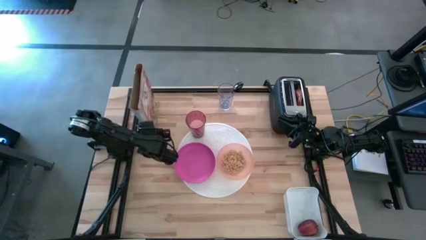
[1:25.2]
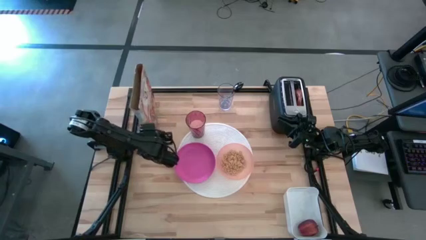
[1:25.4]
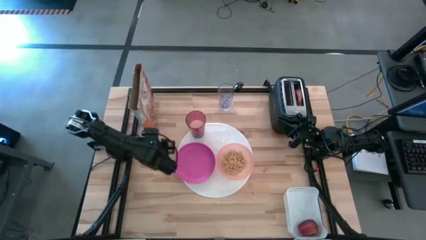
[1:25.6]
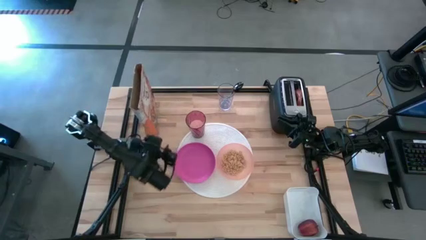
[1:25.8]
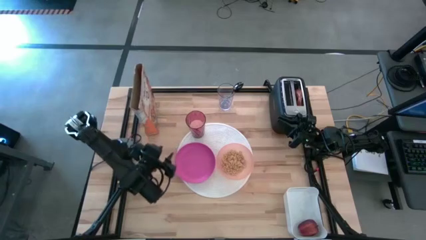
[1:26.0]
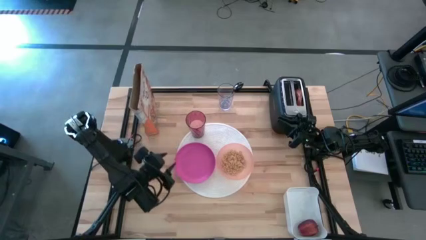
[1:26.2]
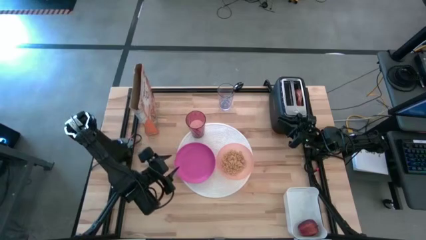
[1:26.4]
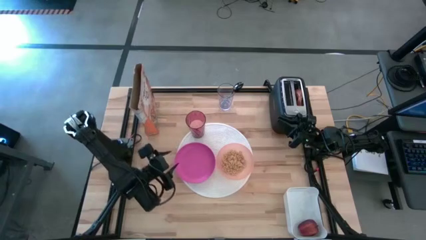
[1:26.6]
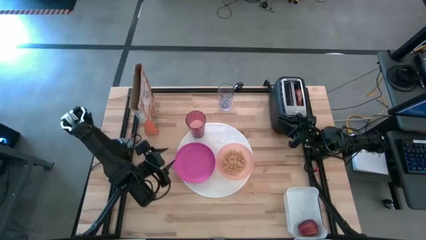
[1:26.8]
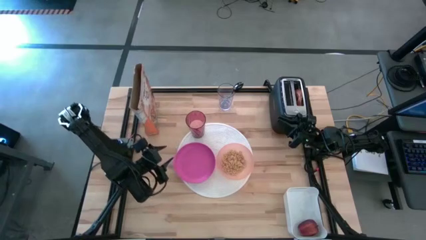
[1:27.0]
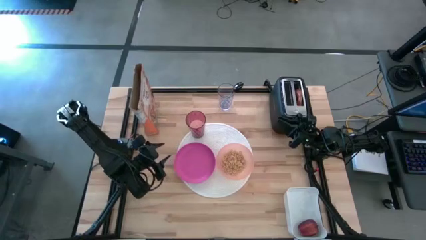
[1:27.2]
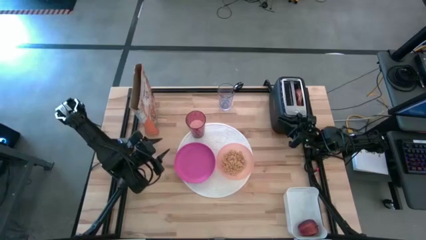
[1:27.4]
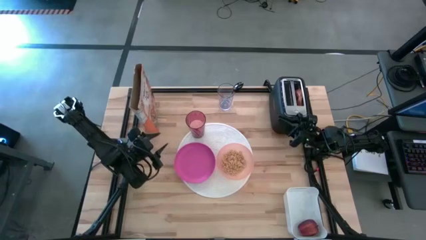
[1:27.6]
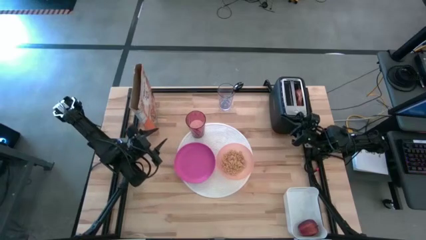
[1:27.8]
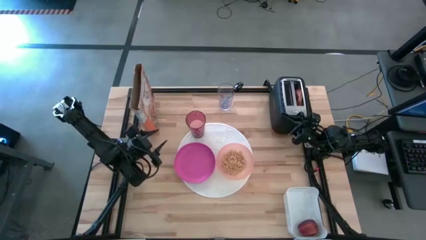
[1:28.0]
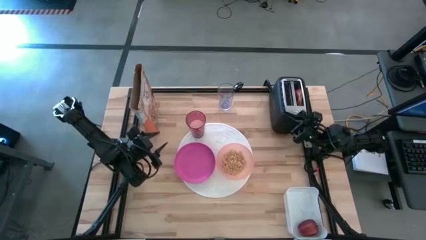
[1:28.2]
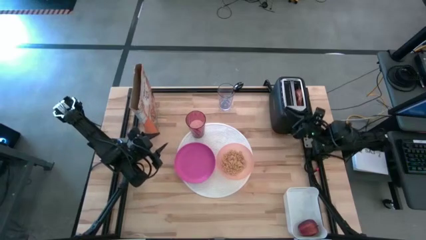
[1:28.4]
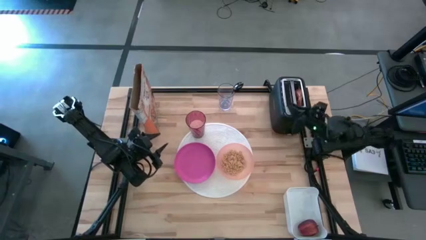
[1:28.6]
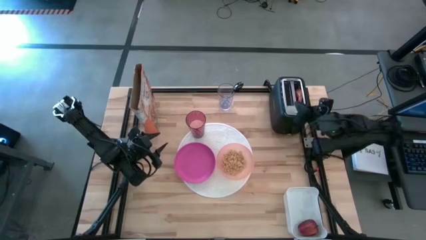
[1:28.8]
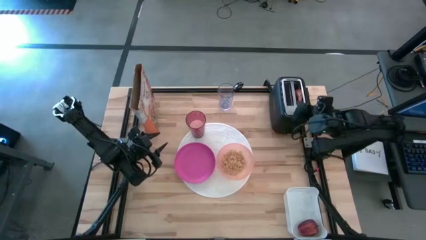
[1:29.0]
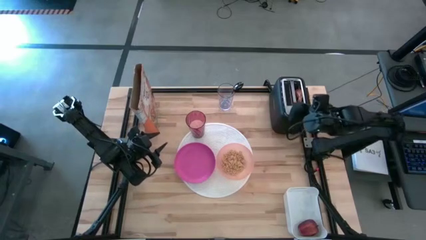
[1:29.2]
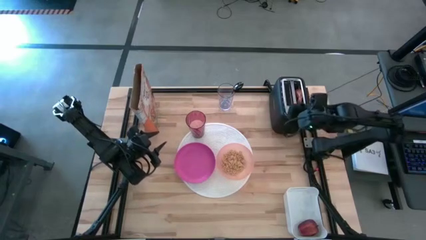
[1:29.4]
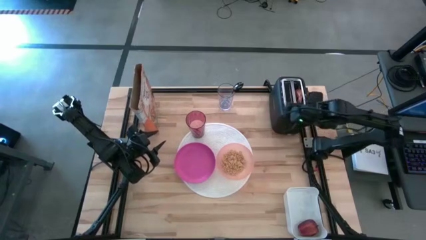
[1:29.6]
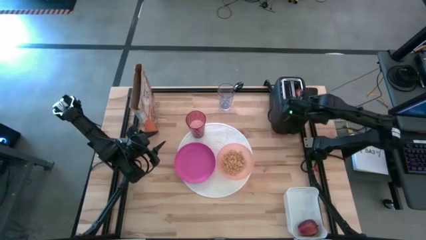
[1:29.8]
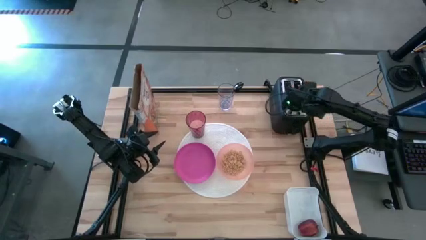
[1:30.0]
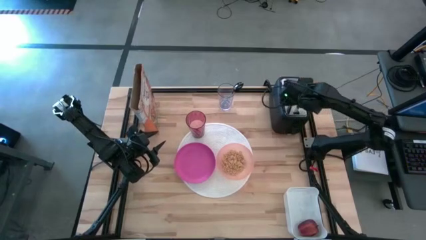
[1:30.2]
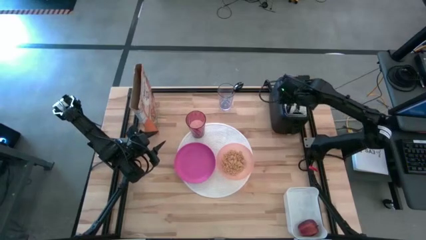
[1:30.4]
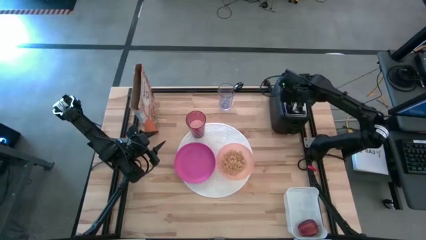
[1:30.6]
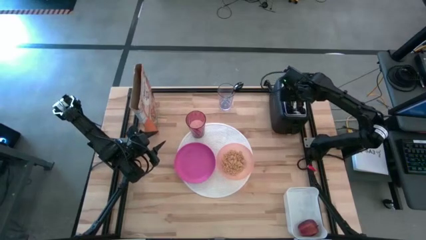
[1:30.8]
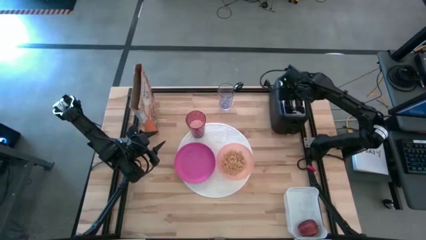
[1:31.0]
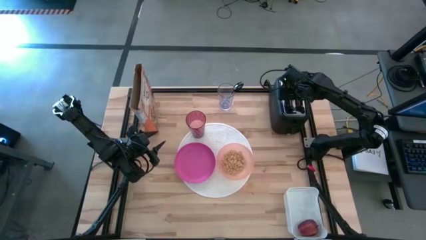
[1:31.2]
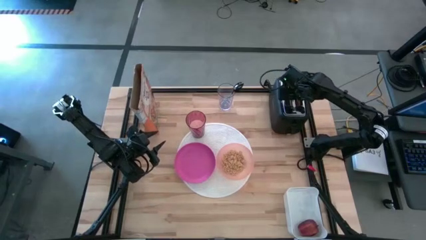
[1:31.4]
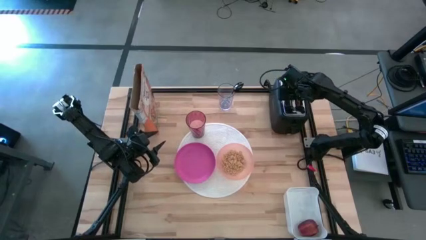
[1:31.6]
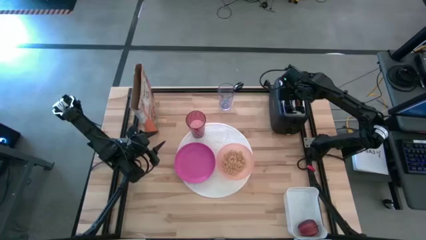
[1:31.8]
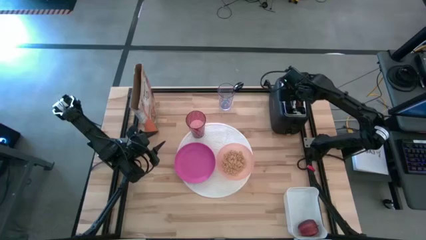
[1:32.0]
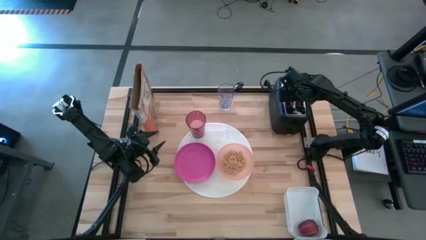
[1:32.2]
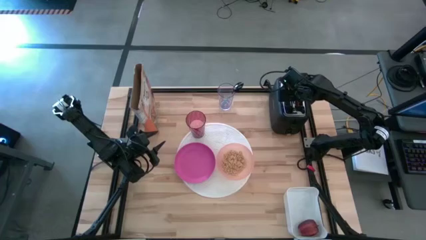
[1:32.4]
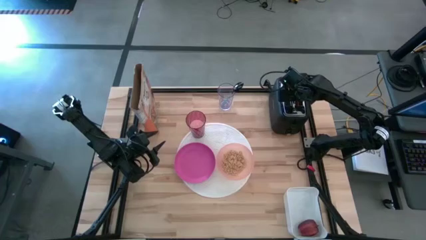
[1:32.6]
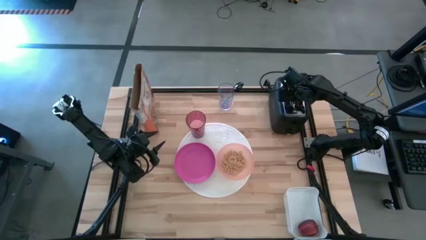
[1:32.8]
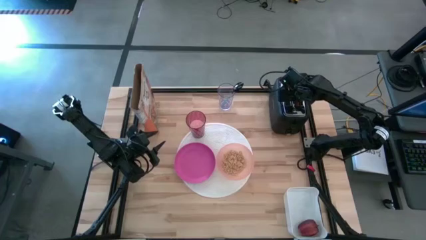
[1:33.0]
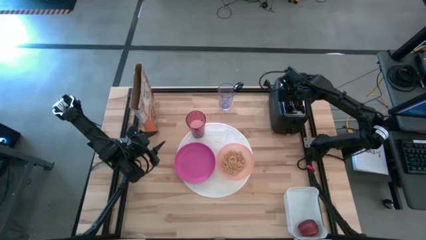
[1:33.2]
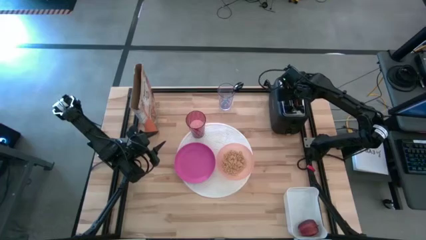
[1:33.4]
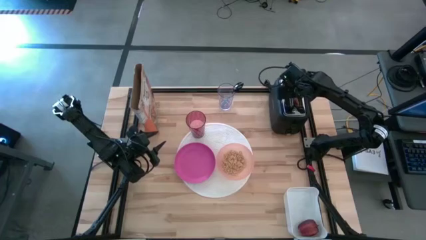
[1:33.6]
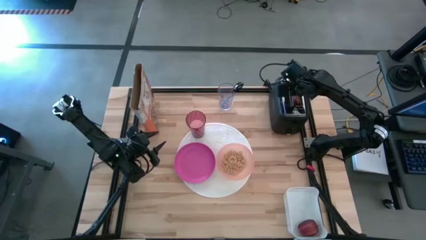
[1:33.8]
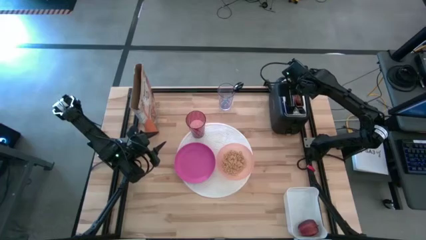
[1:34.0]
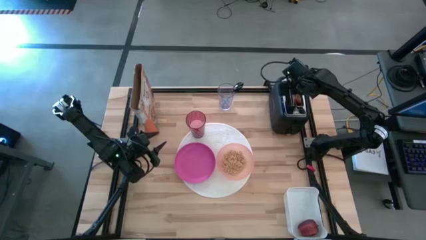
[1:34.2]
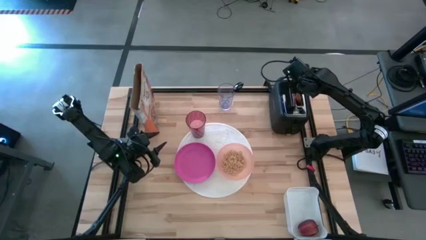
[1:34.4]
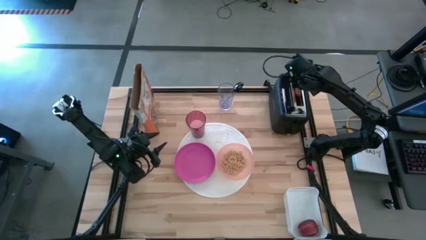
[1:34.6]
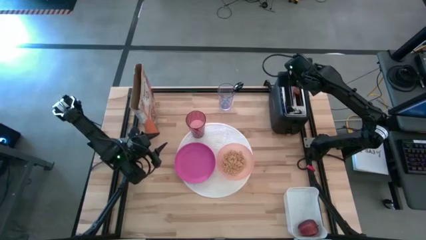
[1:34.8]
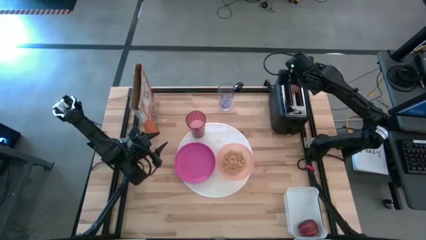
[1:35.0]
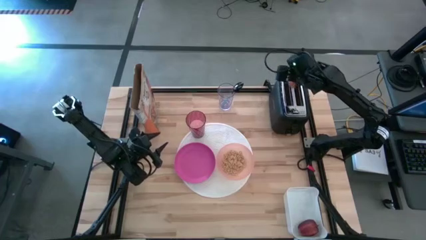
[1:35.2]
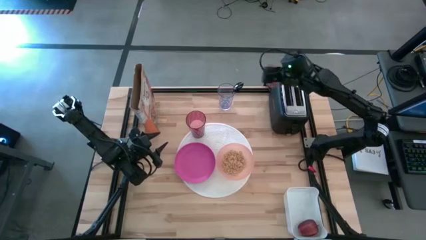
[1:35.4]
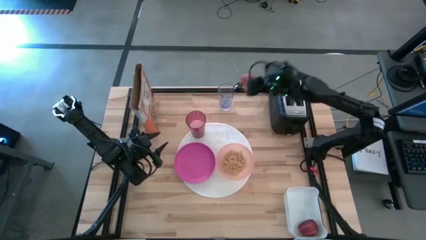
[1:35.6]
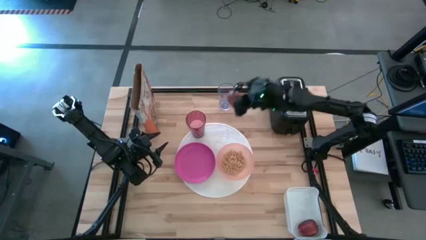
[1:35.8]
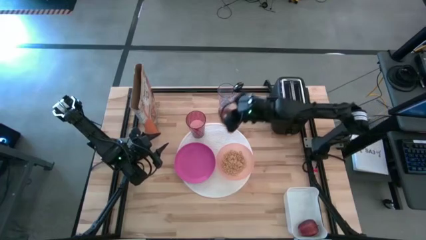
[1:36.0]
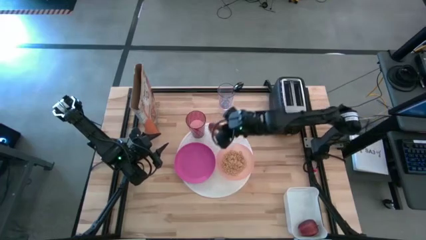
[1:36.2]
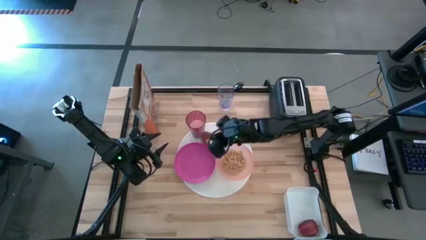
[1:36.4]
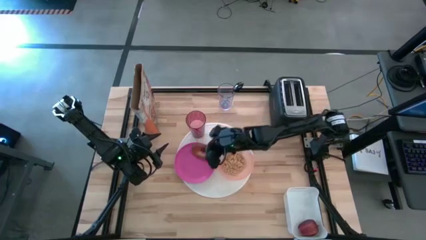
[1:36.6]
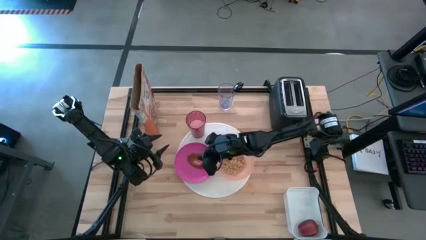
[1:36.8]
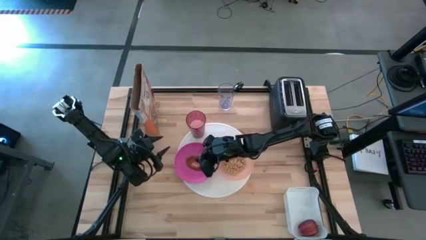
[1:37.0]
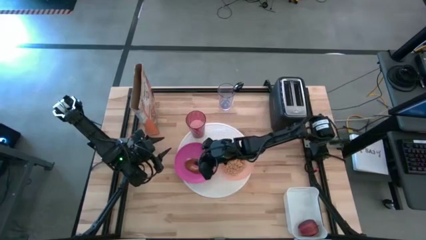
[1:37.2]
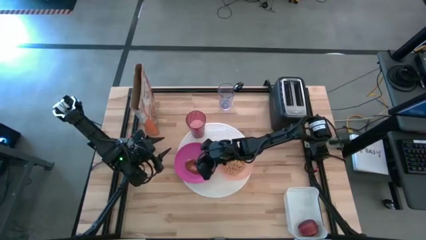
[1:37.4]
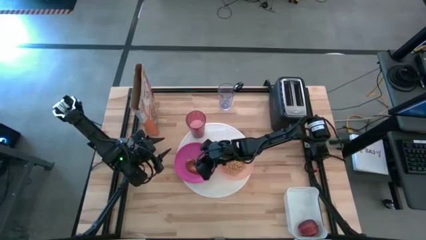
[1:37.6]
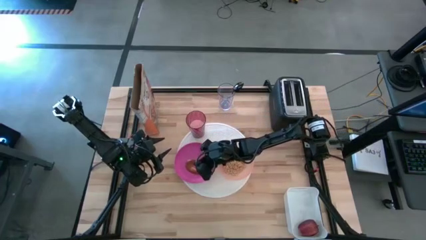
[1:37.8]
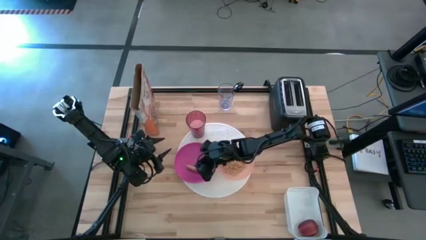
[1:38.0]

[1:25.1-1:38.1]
Task: Arrange a breakfast setting
Put the bread on the pink plate
